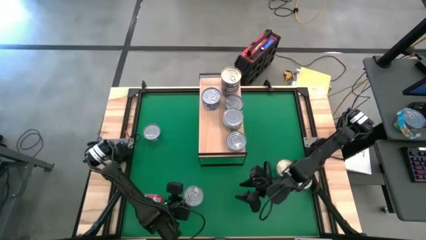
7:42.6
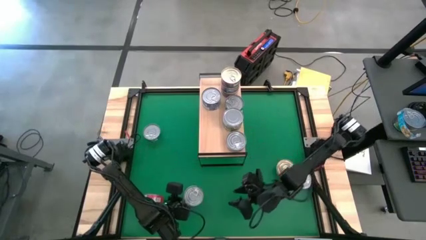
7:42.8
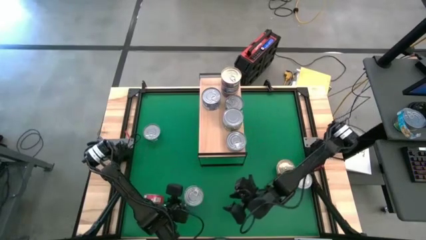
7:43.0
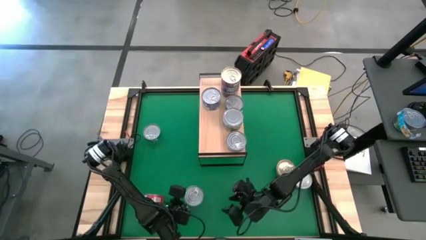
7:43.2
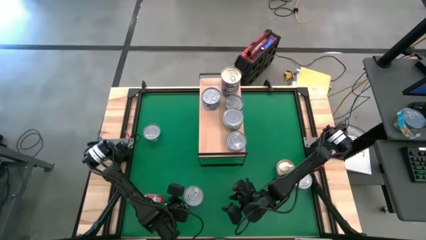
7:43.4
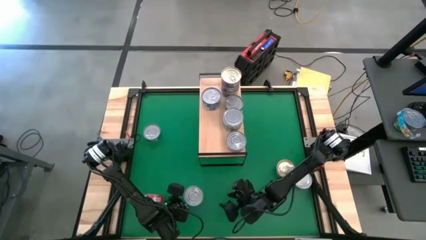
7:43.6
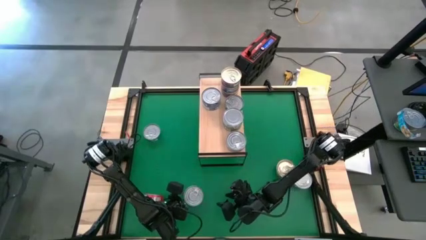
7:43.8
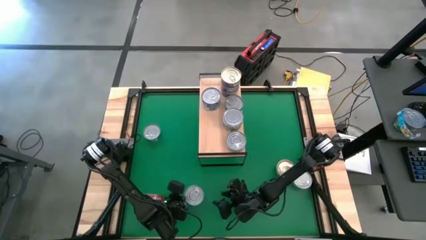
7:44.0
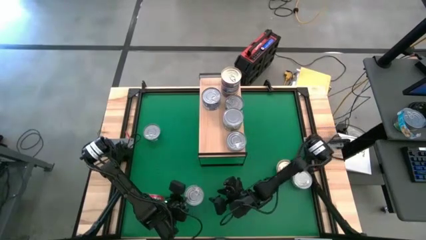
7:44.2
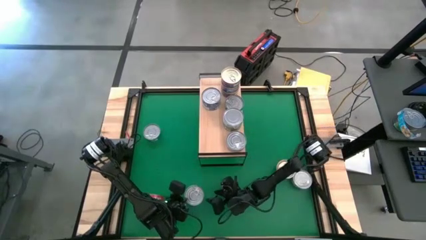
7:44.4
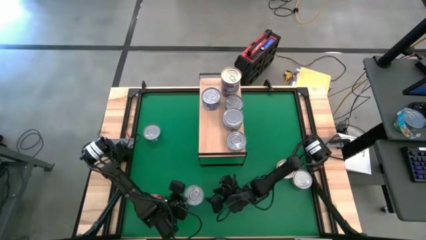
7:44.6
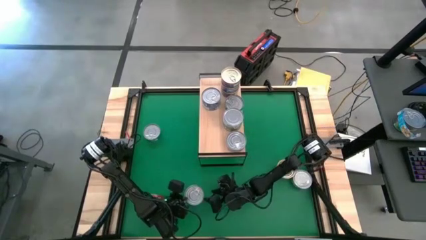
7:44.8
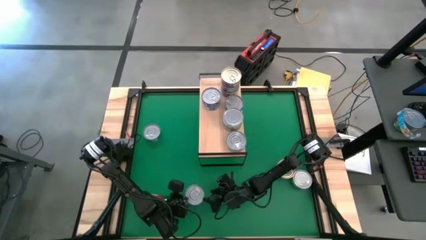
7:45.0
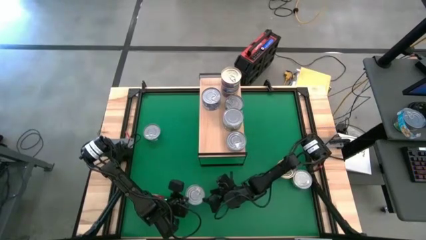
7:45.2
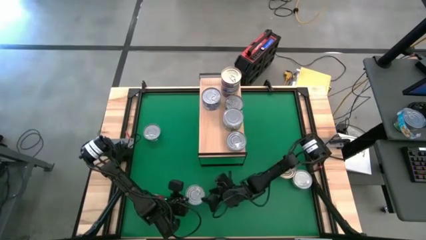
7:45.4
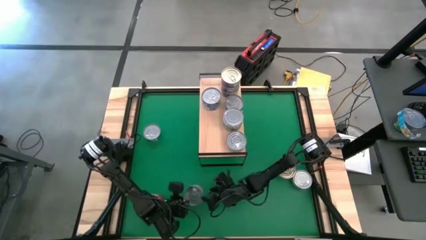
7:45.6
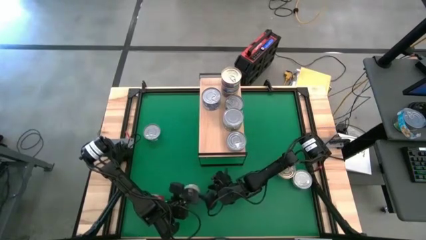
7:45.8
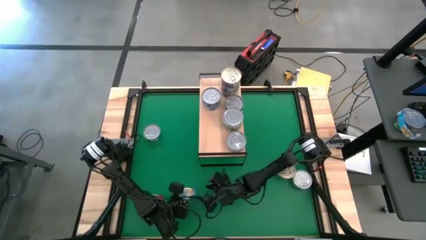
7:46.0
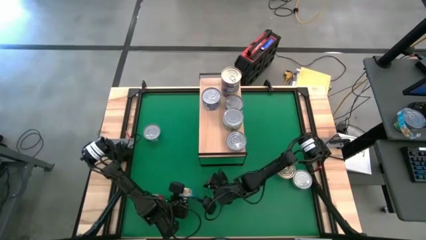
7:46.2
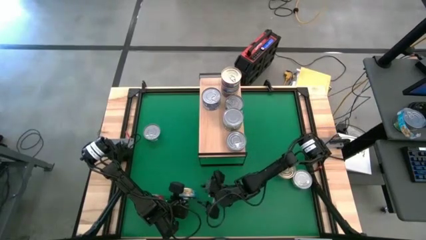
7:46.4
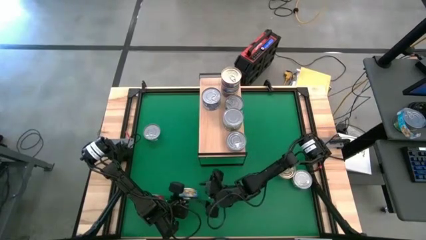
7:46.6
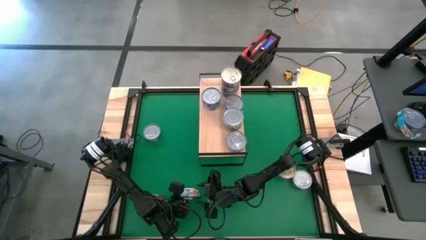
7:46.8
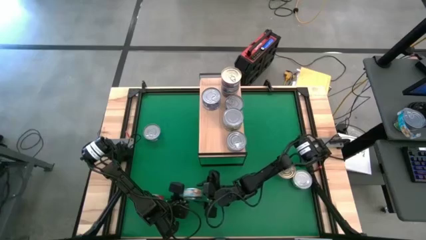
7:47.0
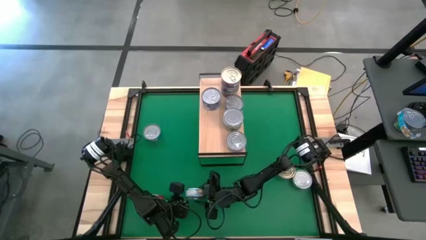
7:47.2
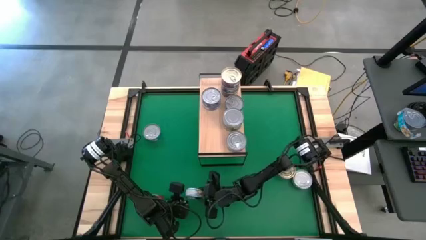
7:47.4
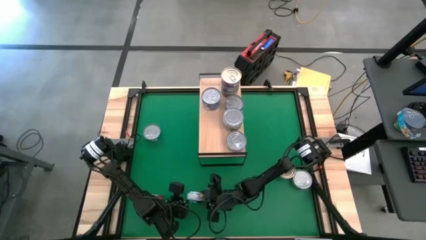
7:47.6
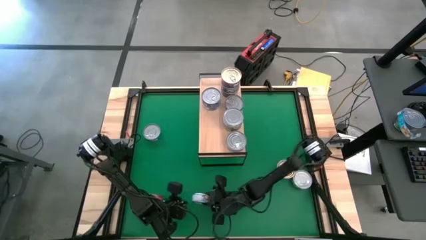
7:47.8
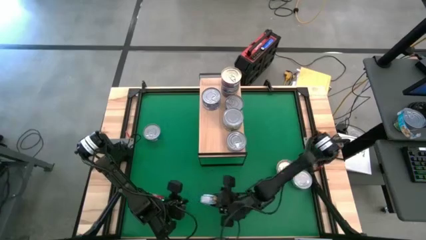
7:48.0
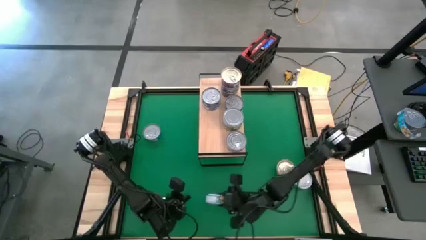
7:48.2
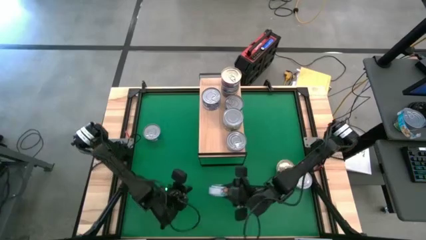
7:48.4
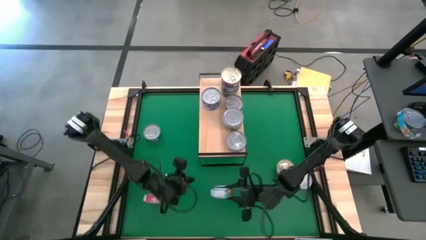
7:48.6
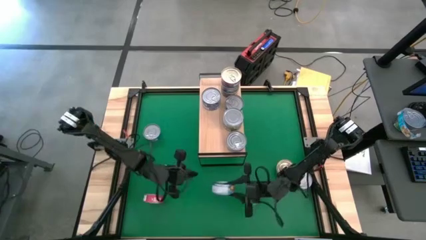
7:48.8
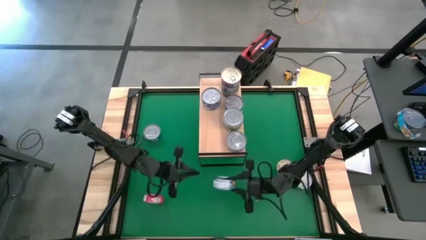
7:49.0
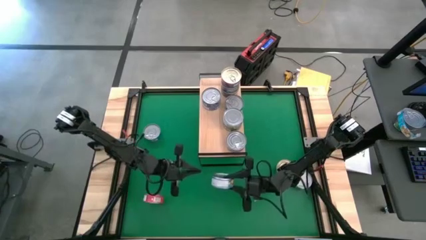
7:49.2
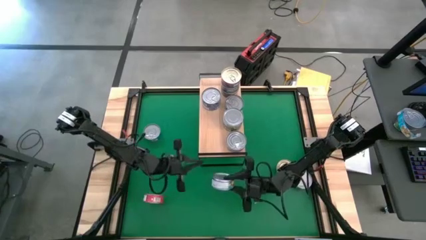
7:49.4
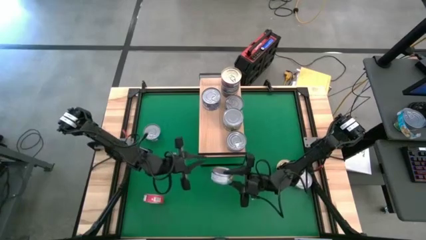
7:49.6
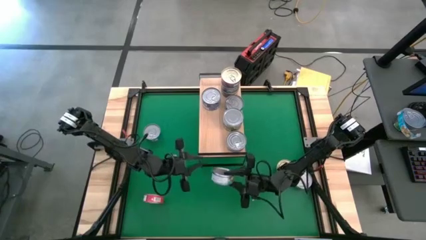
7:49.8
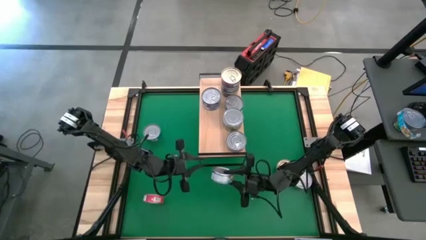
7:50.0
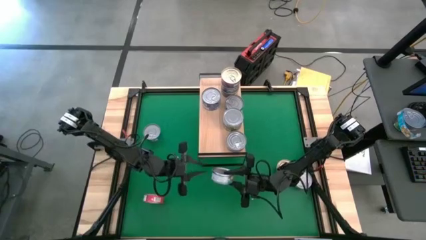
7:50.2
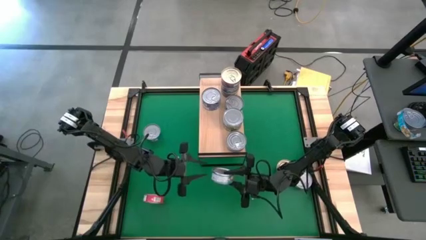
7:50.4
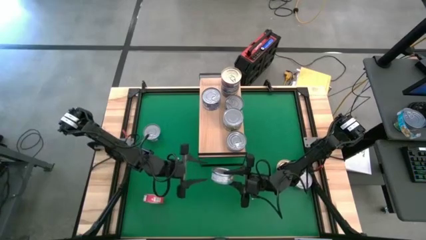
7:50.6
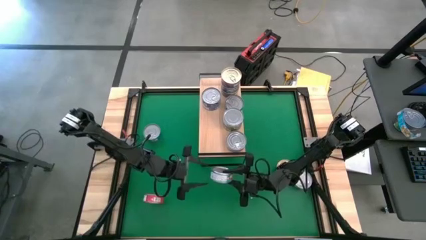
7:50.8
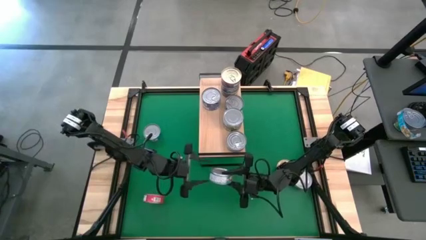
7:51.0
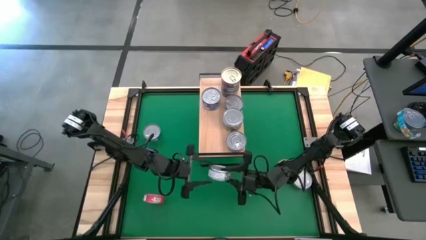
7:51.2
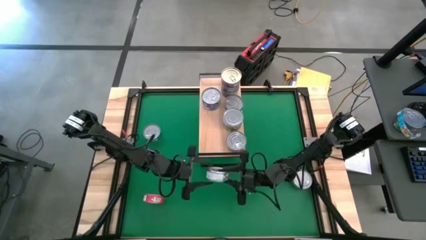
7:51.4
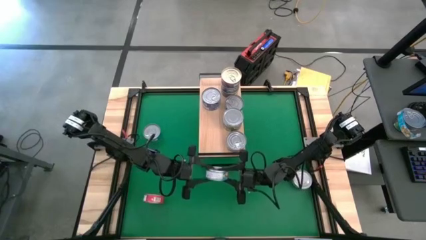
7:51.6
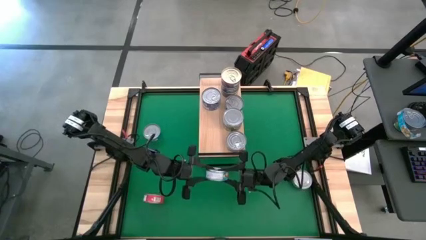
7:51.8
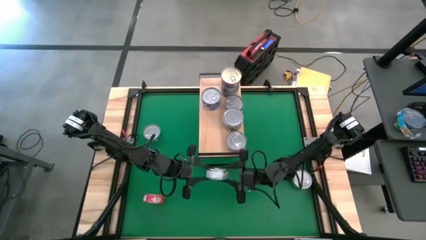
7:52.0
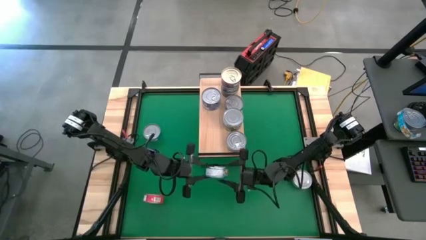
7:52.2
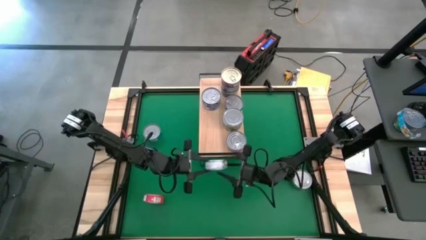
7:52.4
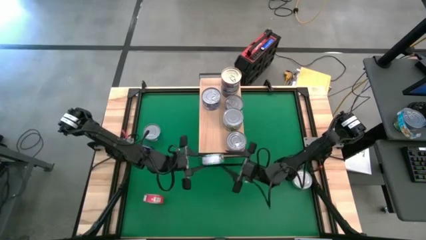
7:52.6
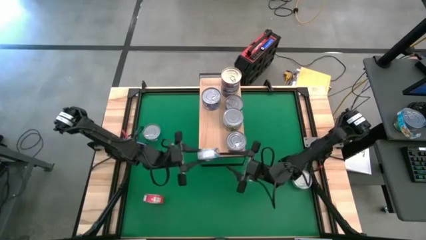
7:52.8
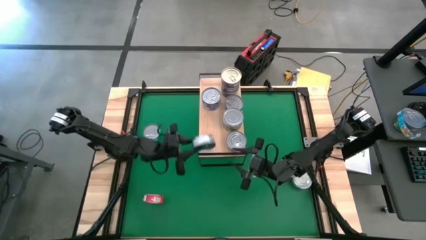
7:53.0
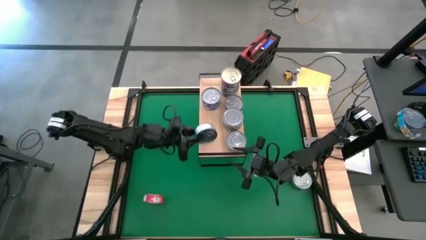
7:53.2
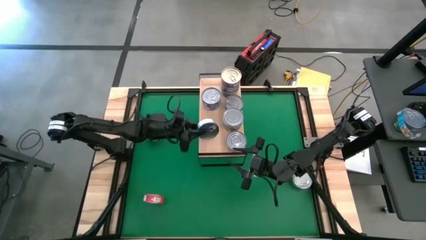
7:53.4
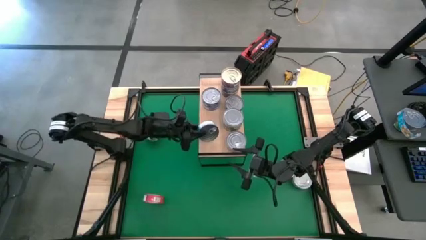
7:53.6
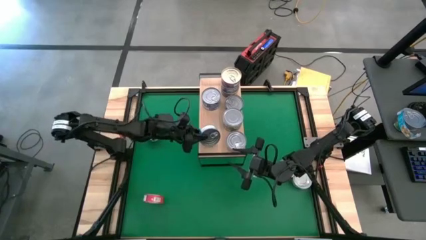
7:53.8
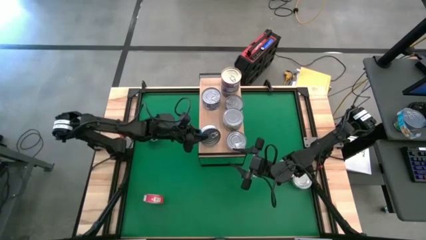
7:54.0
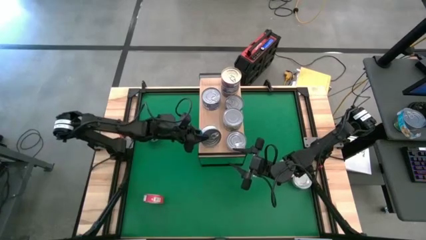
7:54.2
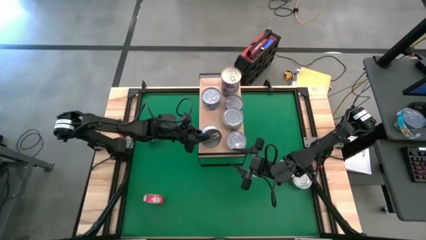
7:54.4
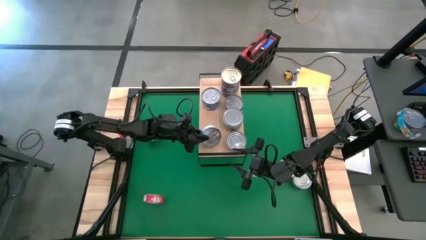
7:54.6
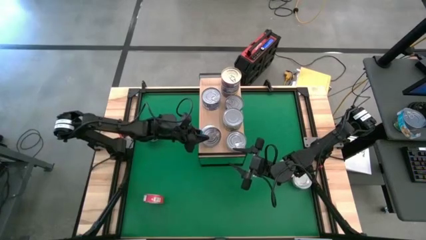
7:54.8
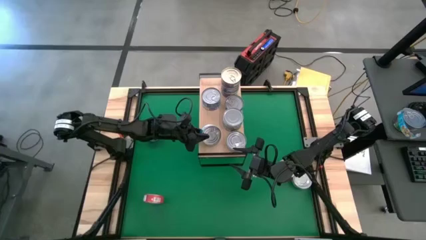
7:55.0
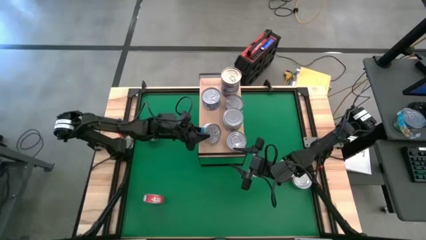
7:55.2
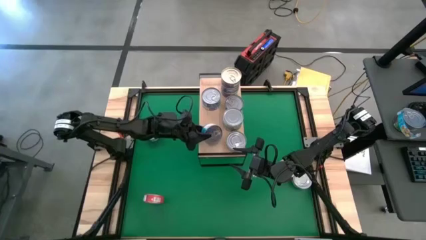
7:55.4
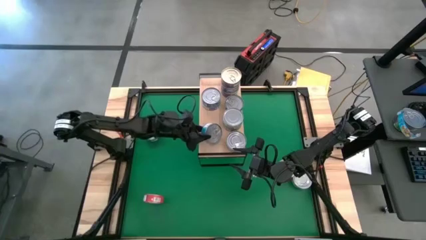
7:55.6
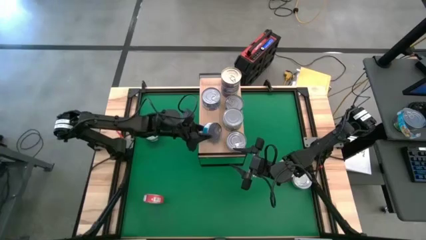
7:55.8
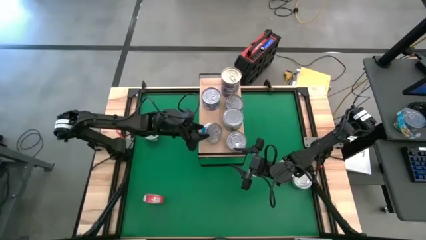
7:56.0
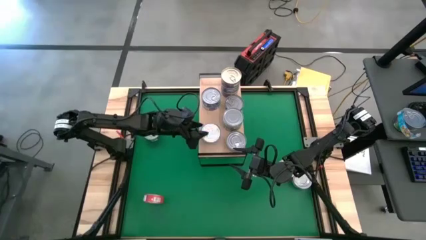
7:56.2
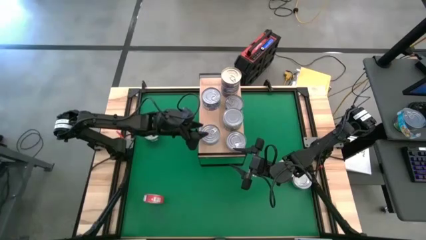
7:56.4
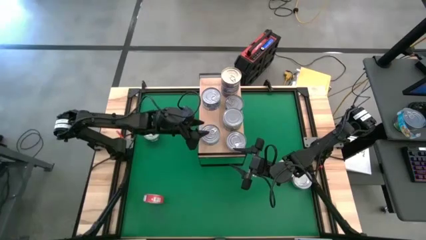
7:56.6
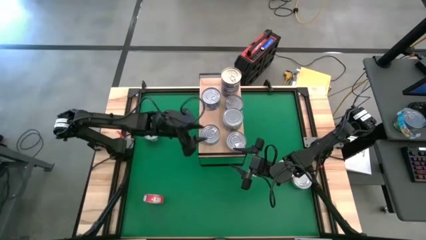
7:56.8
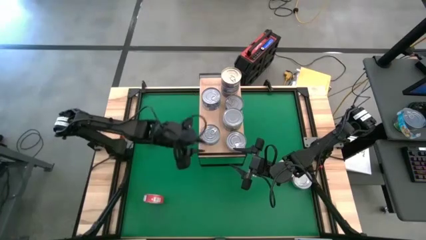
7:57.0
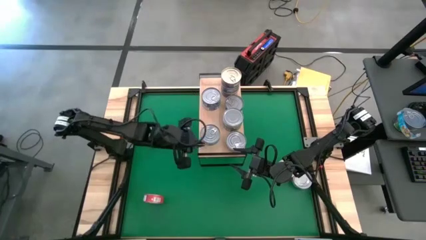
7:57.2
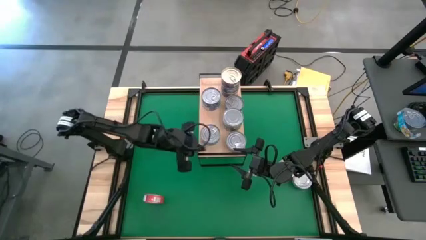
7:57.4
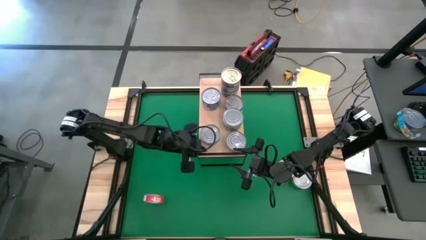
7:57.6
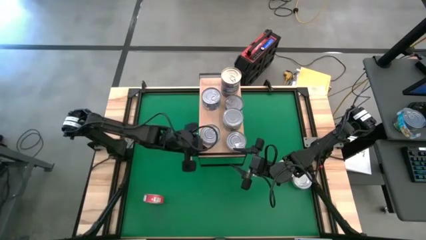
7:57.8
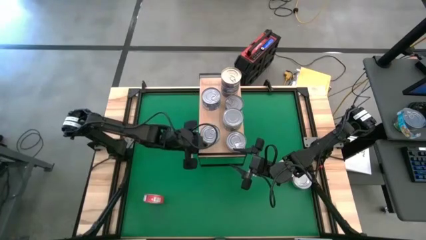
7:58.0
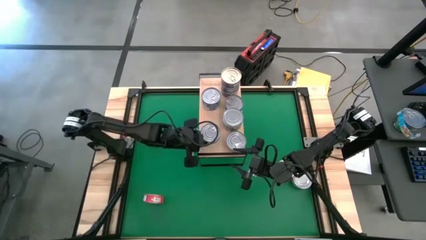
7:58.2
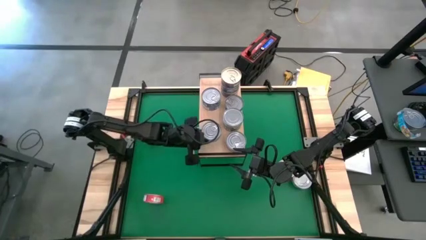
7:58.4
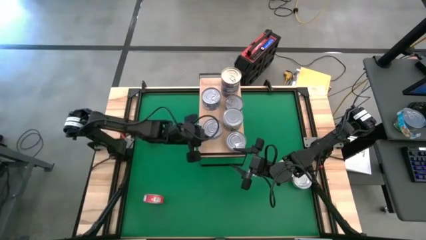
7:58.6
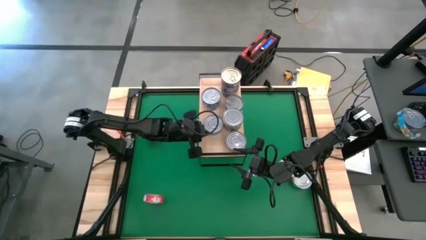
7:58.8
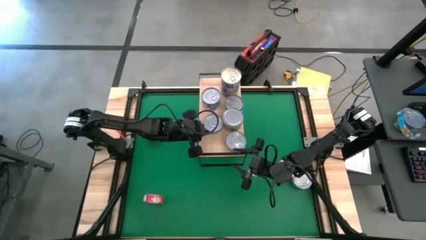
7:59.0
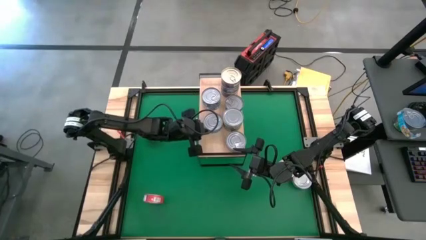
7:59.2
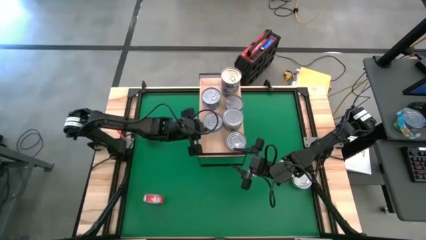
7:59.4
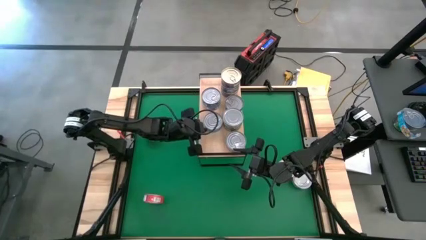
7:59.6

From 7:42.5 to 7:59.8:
Task: Stack canned seafood by type on shelf
Put the top yellow tuna can on the shelf
